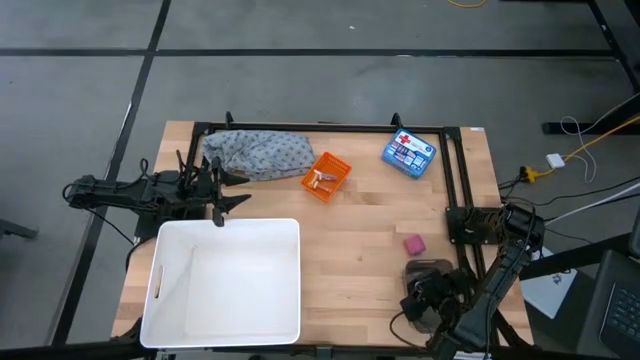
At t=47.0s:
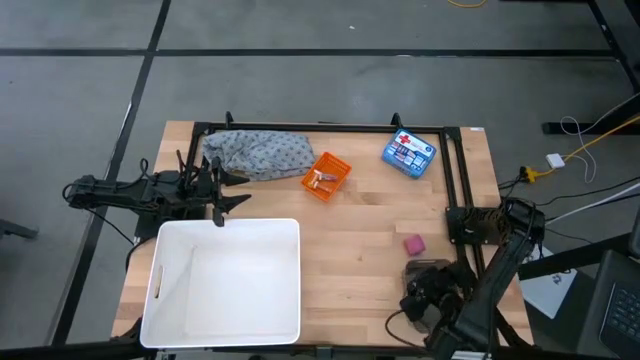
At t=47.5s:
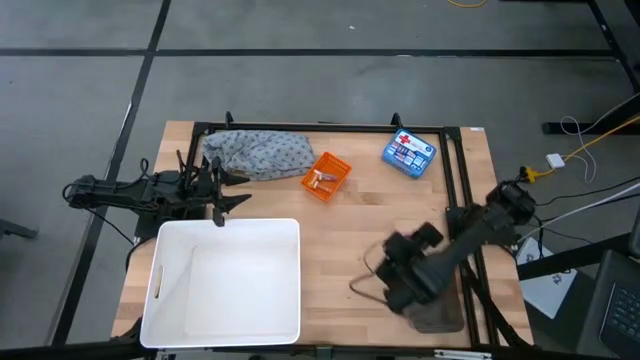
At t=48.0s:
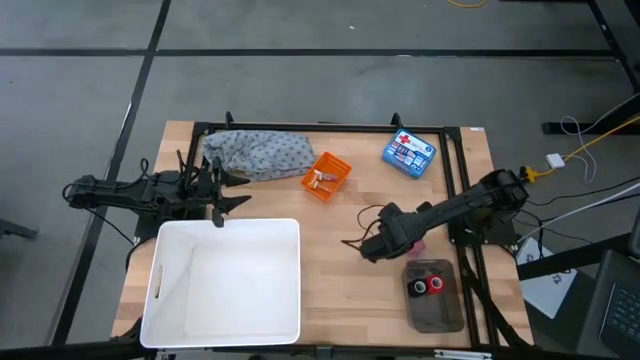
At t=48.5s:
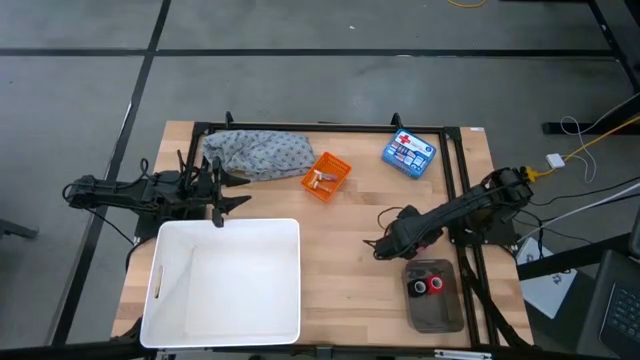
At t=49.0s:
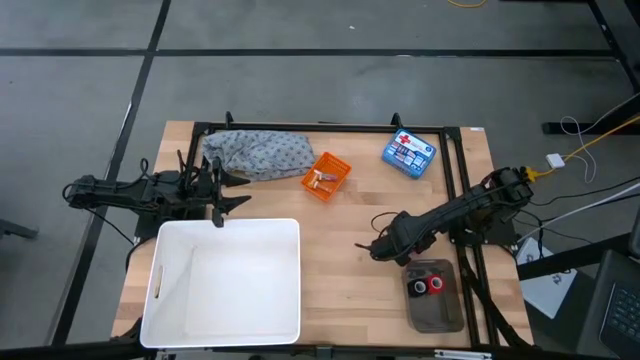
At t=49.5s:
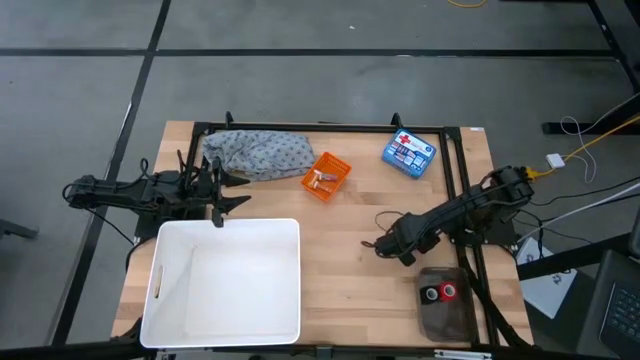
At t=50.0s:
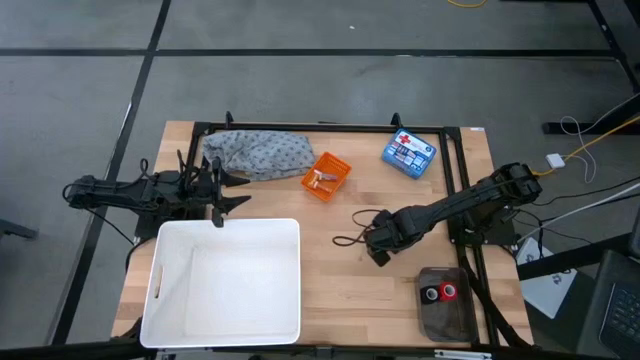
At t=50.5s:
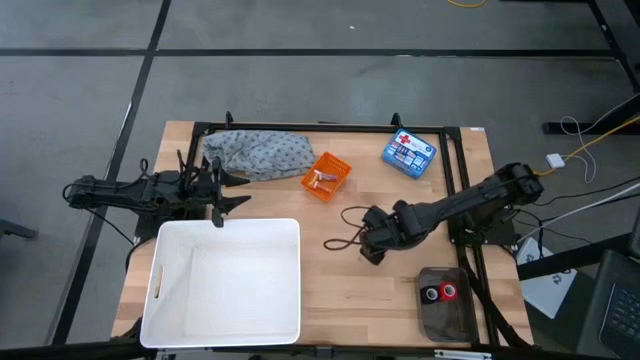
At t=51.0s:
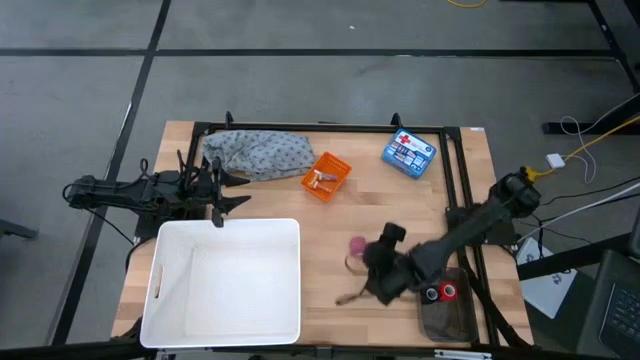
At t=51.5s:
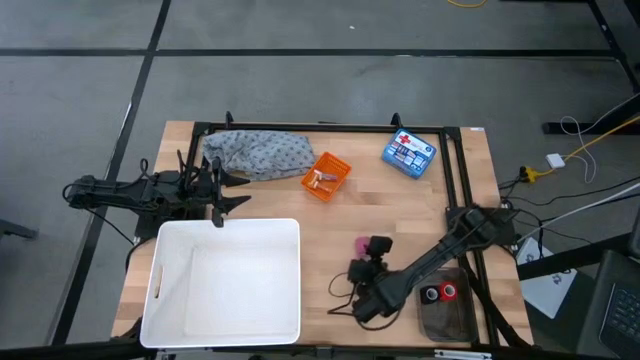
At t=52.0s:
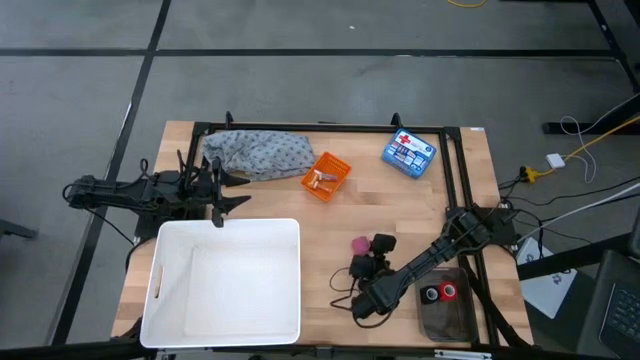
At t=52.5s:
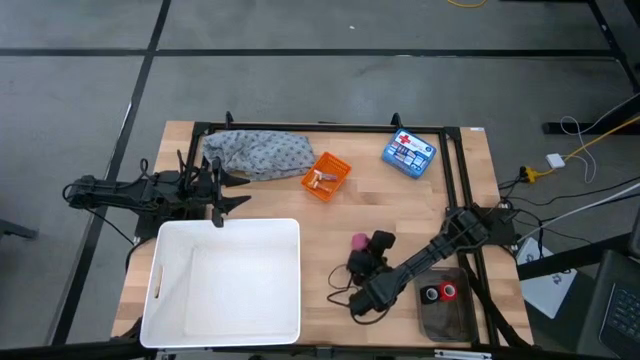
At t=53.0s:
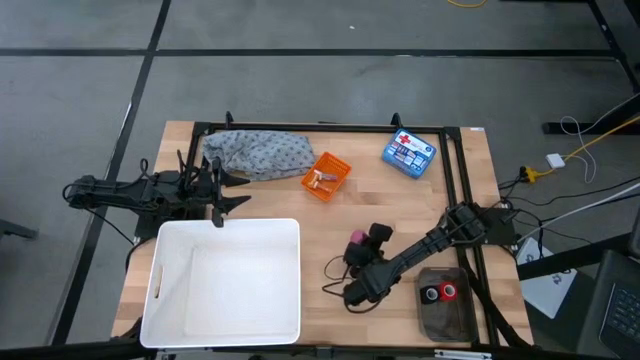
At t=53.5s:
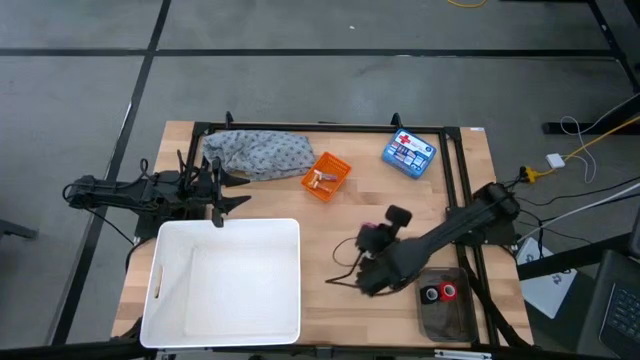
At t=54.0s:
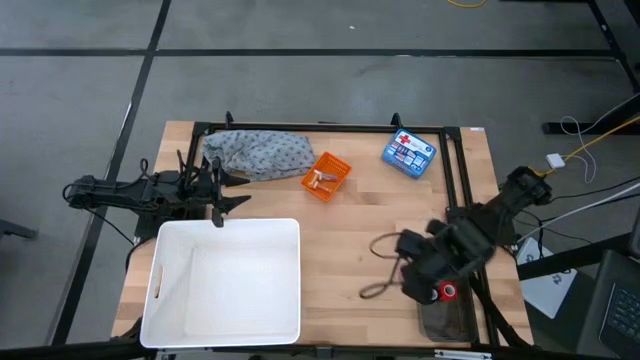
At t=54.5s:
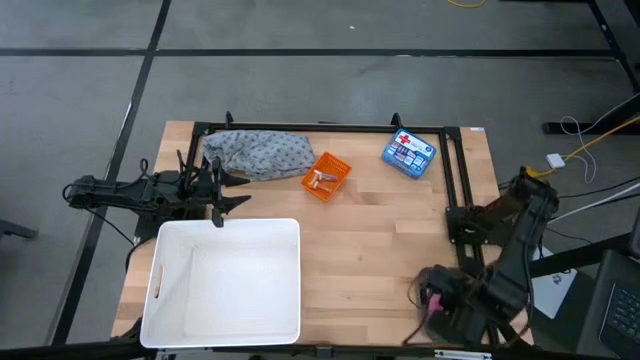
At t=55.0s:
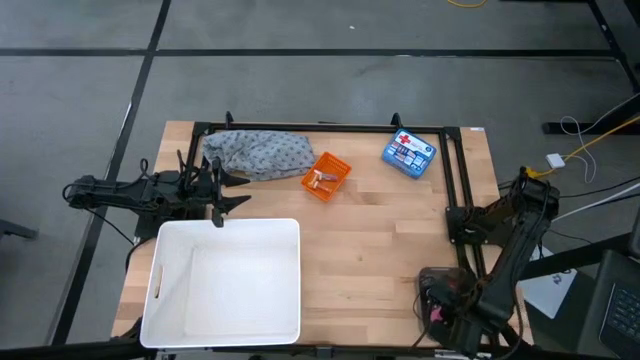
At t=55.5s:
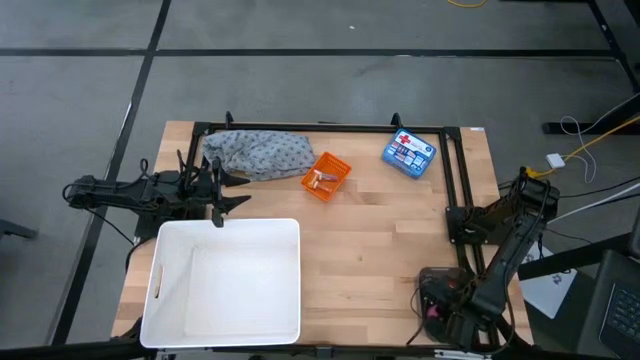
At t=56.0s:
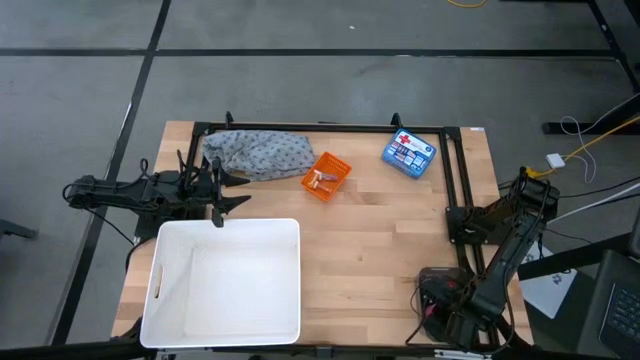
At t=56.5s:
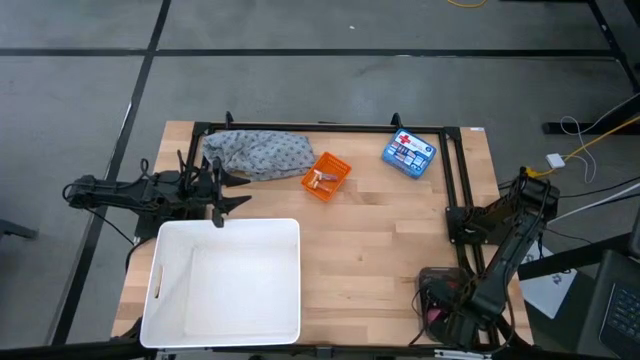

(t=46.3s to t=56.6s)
Task: Pick & place medical supplies in basket/bin
Put the pink bandage into the transparent black bin

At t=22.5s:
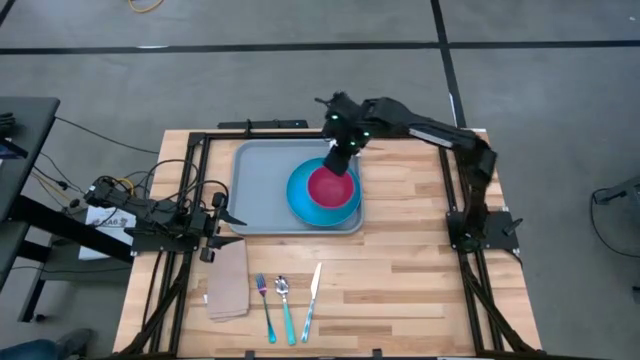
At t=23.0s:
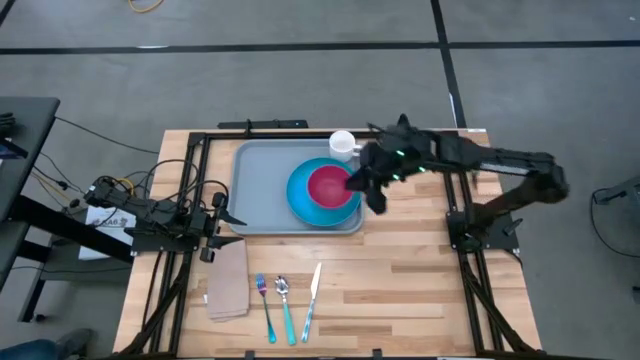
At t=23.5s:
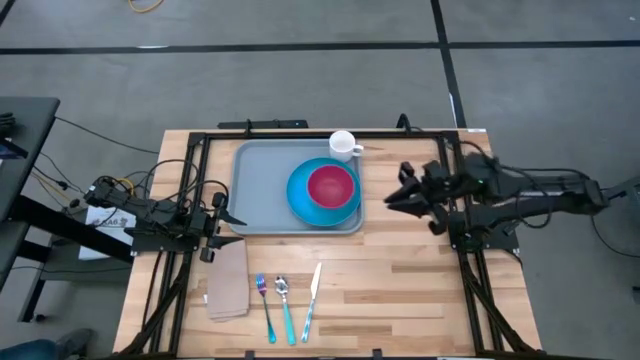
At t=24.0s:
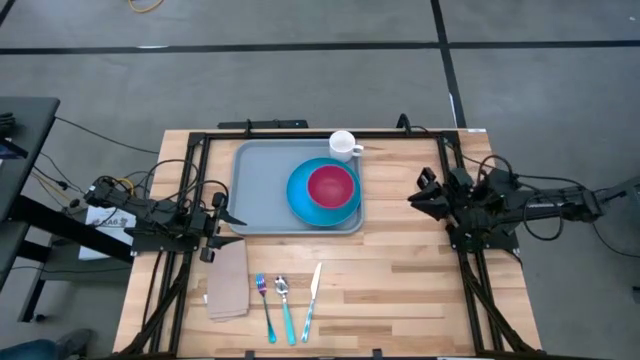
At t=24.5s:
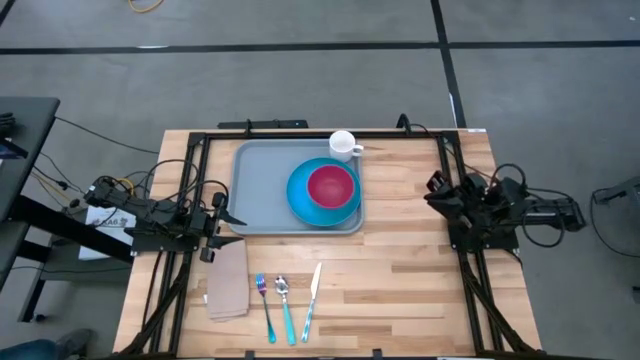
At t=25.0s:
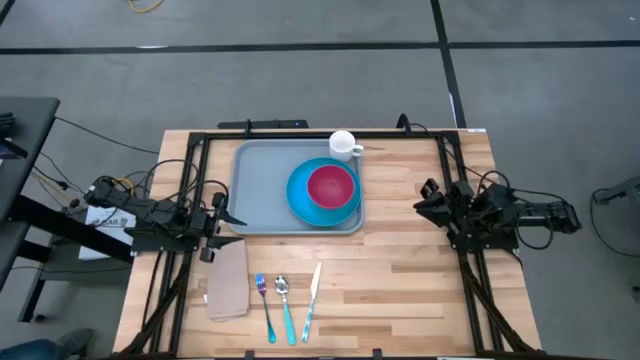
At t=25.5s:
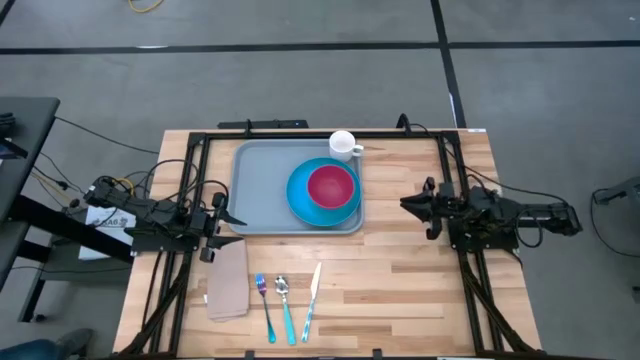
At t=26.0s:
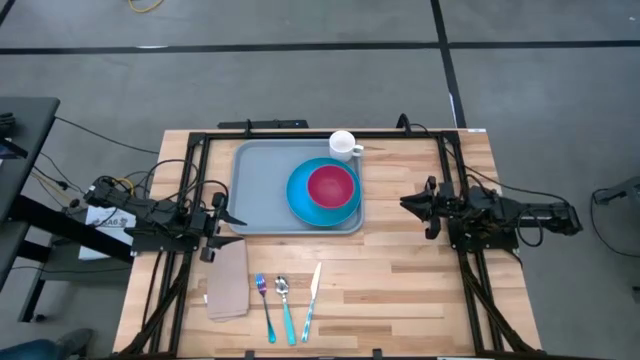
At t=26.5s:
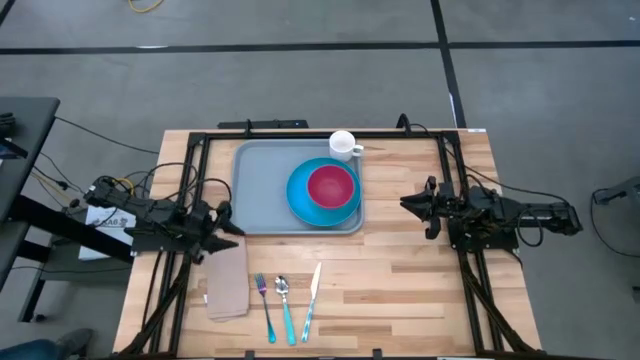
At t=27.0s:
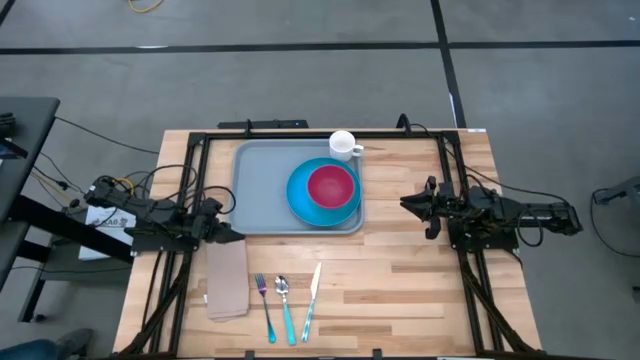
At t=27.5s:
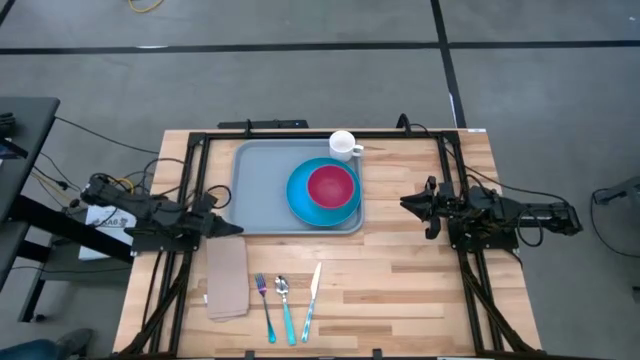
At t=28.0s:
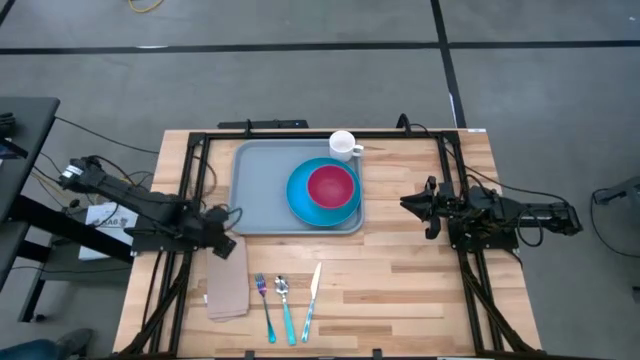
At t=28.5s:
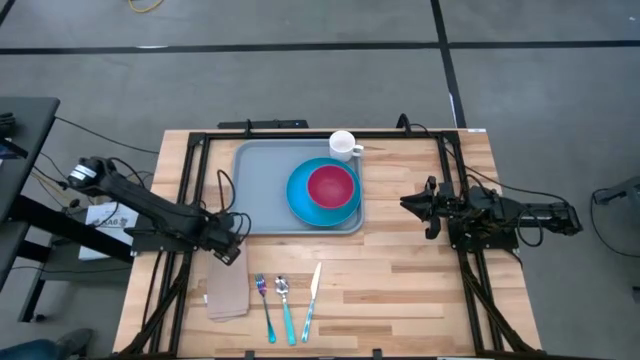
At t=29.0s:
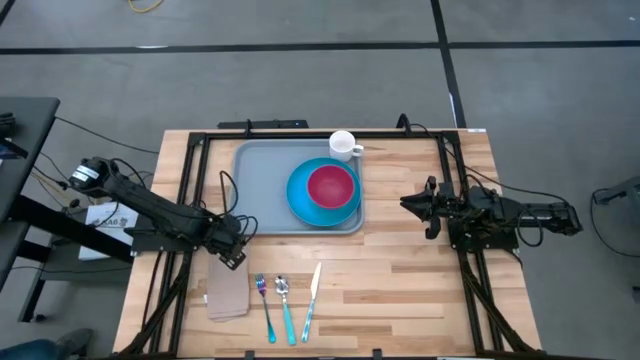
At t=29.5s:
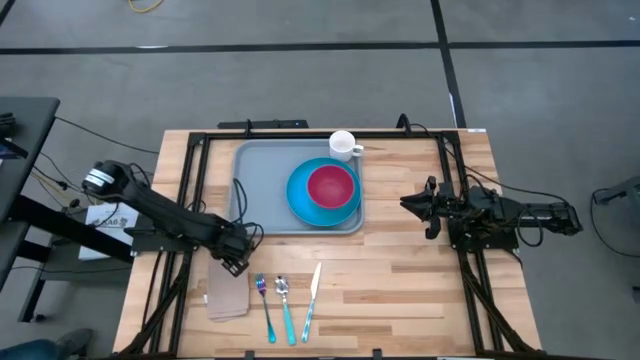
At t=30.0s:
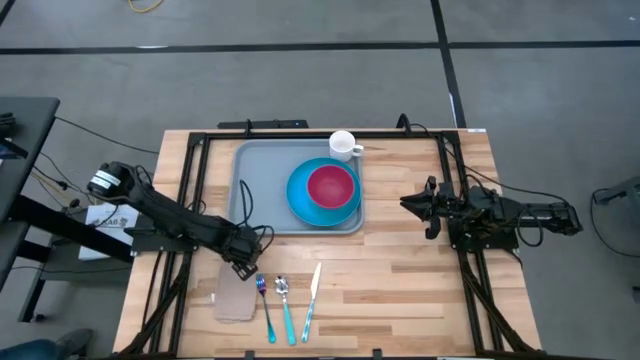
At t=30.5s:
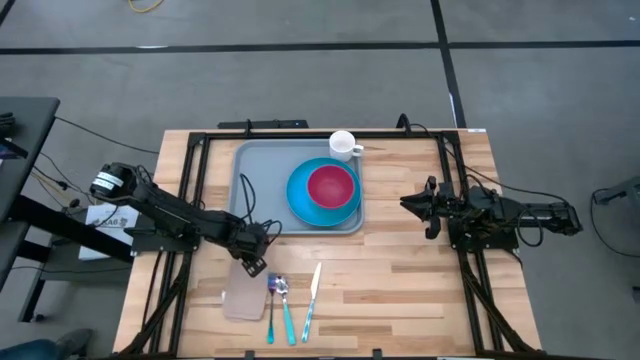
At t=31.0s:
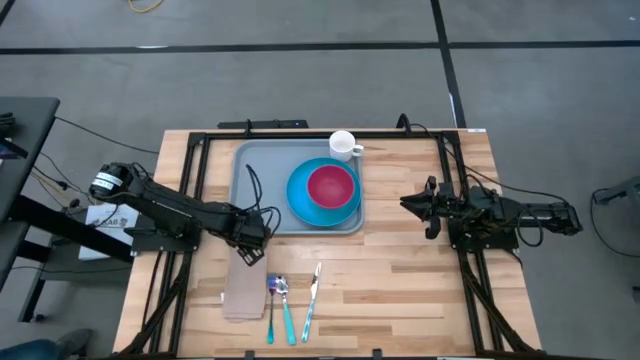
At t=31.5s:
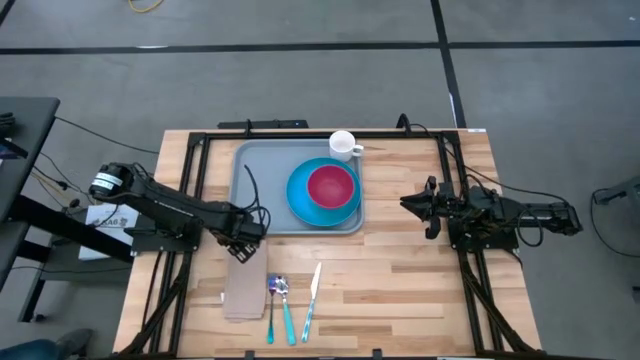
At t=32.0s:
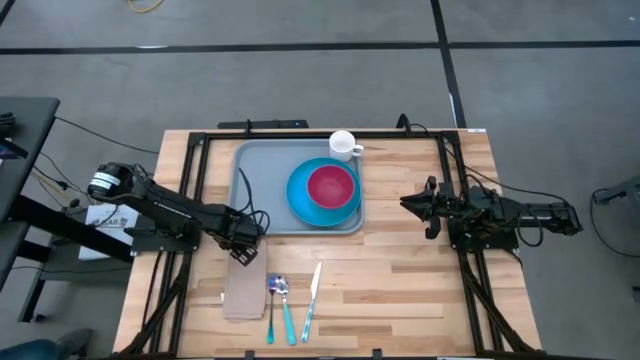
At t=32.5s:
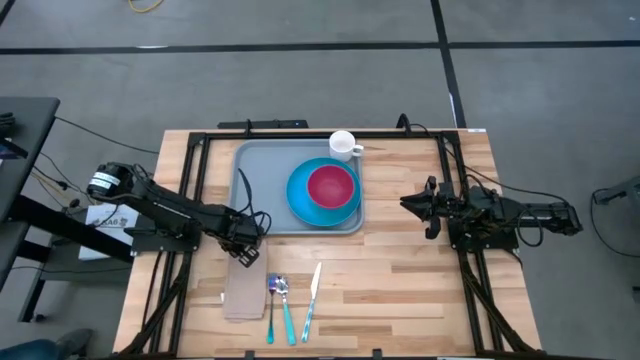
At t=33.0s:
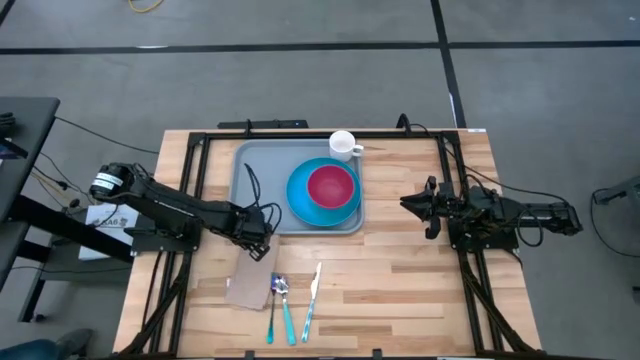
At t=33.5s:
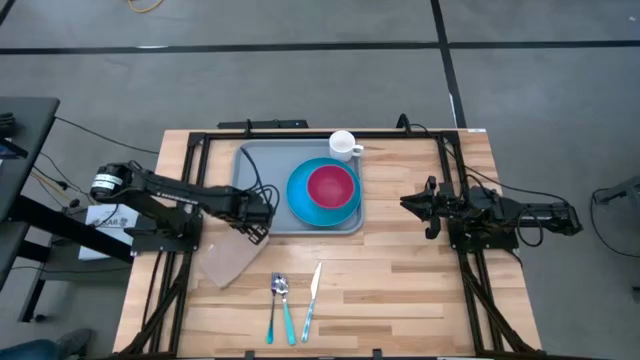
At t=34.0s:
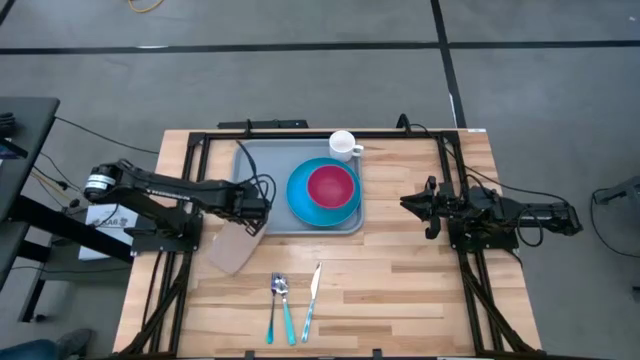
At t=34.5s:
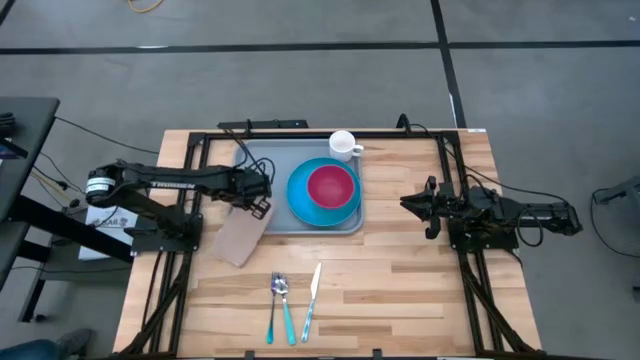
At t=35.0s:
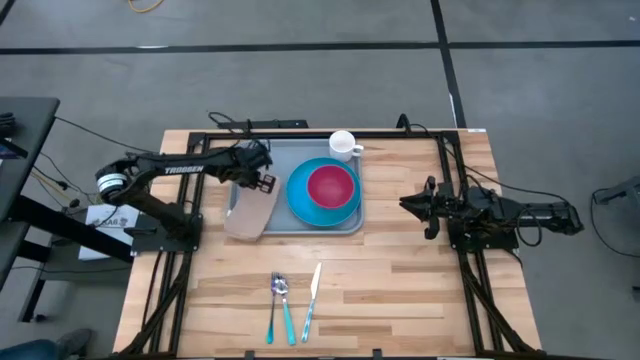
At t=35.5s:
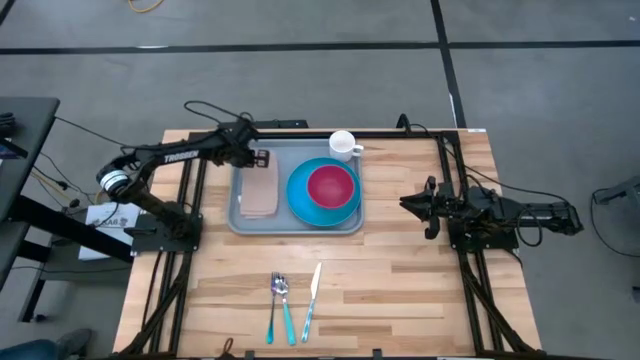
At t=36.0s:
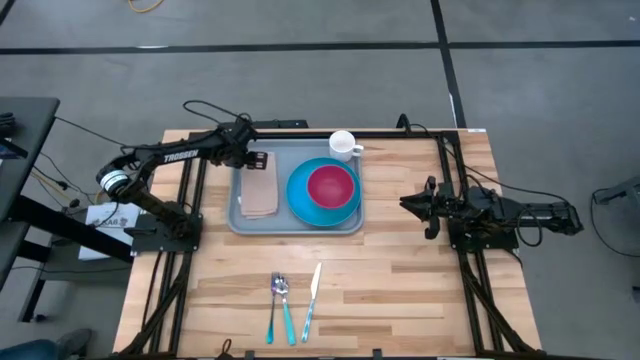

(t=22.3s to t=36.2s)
Task: Set up tray
Put the brown napkin on the gray serving tray to the left of the blue plate
